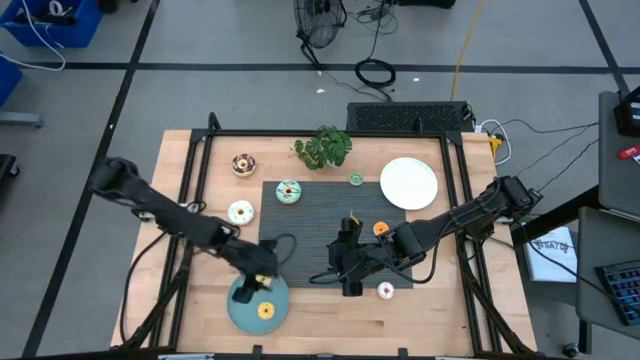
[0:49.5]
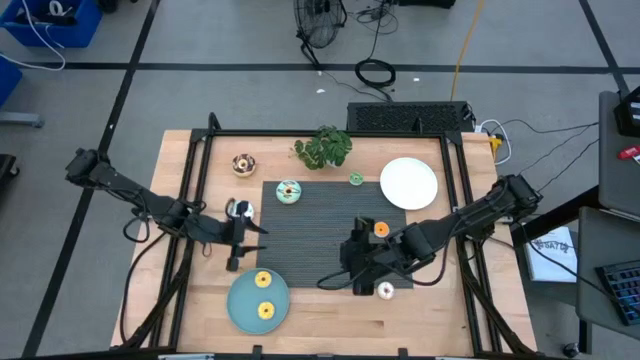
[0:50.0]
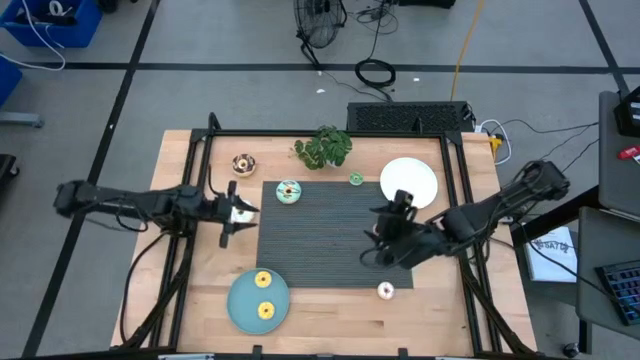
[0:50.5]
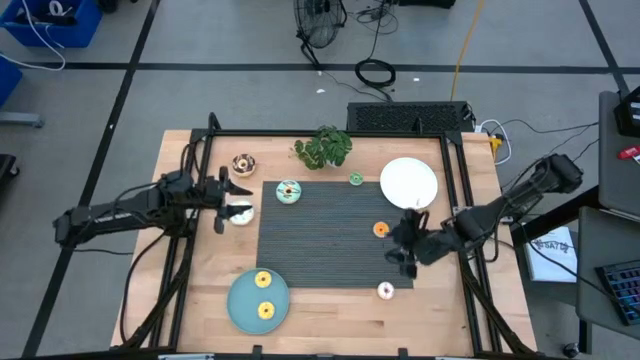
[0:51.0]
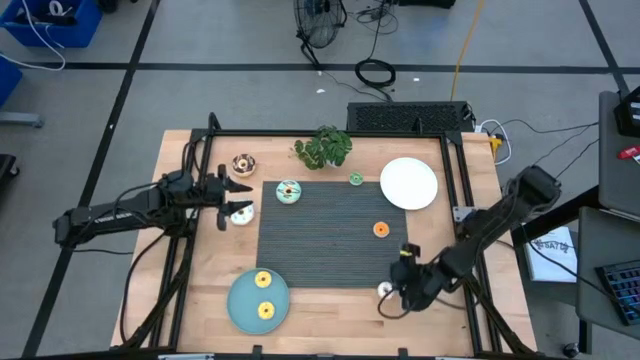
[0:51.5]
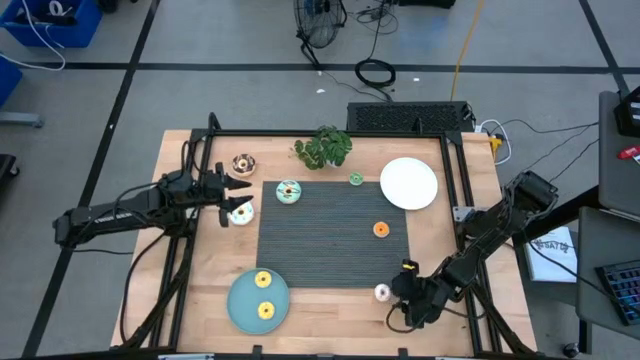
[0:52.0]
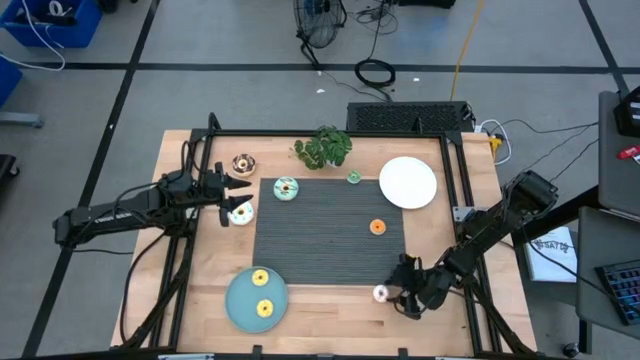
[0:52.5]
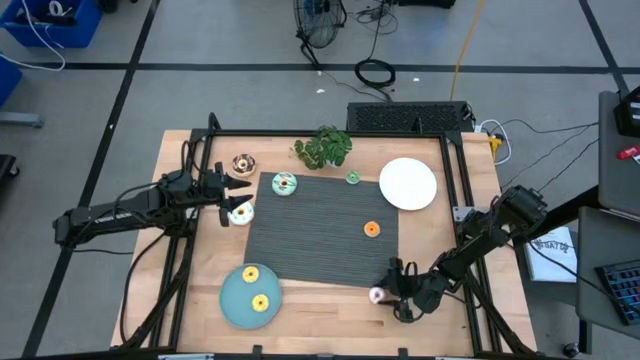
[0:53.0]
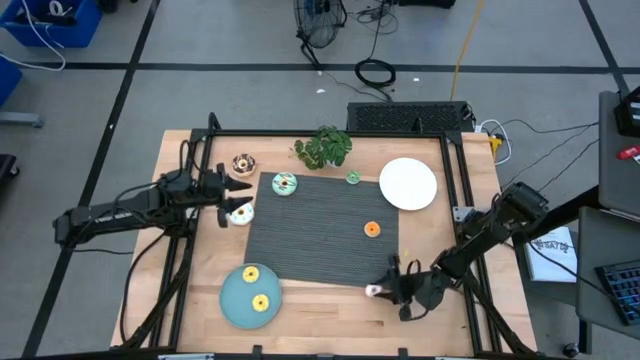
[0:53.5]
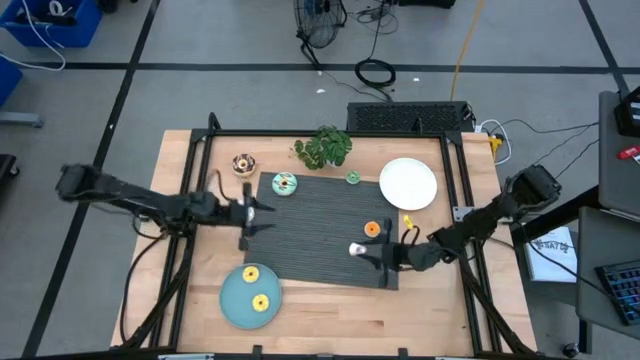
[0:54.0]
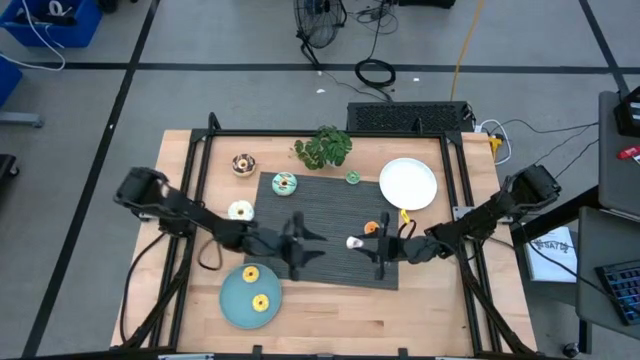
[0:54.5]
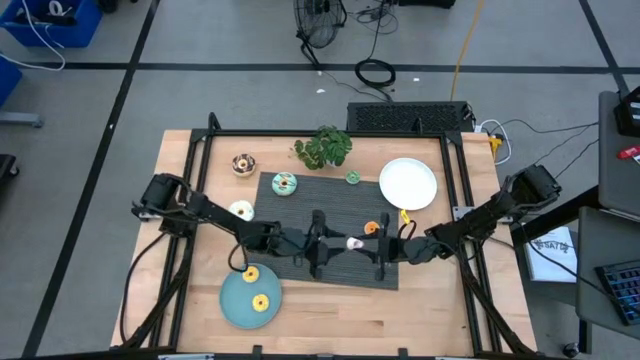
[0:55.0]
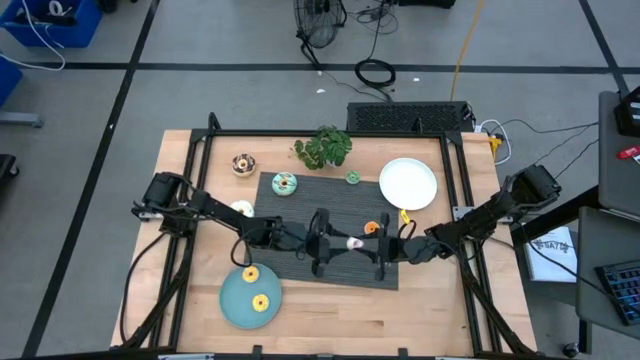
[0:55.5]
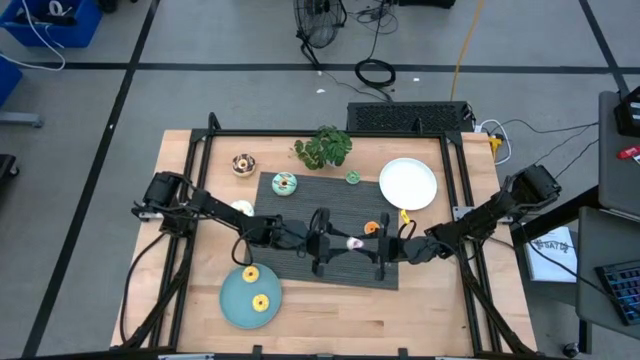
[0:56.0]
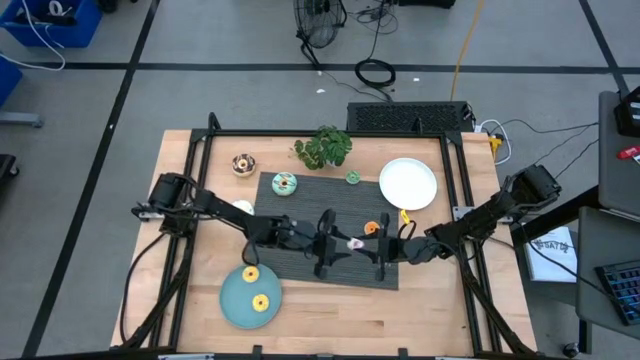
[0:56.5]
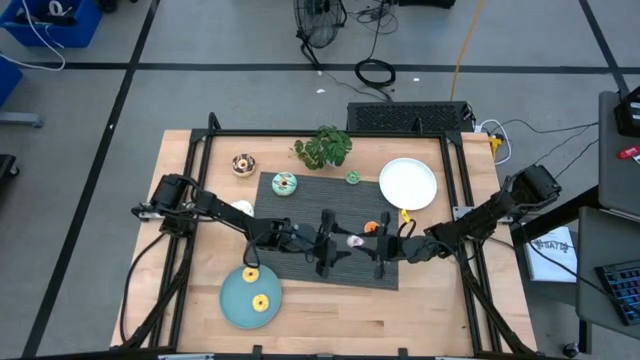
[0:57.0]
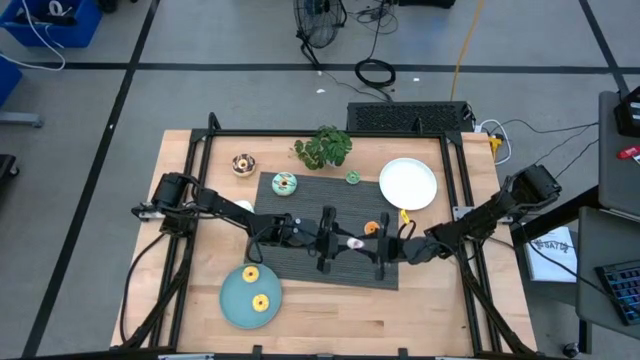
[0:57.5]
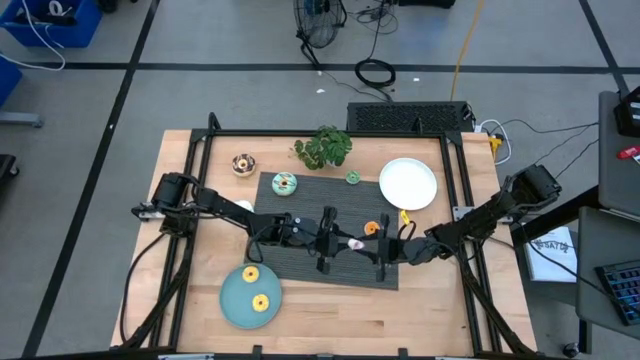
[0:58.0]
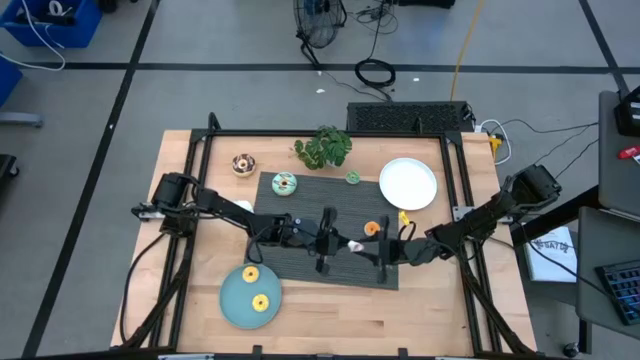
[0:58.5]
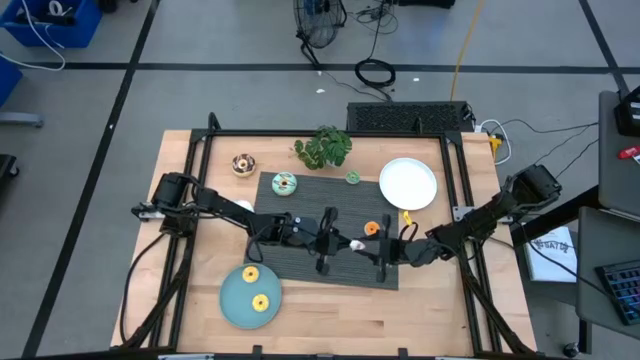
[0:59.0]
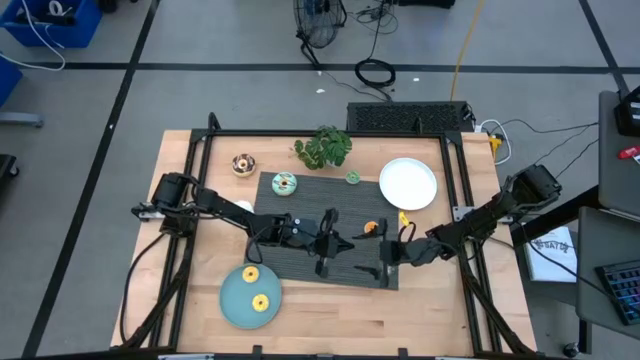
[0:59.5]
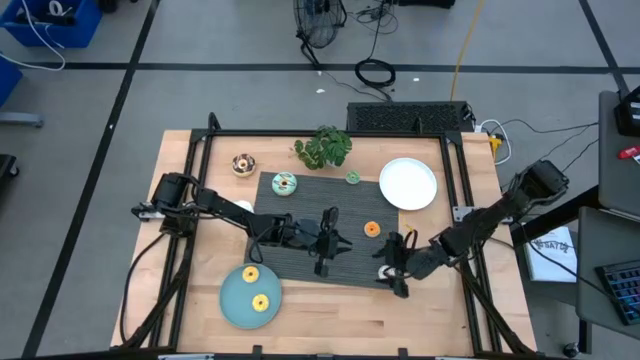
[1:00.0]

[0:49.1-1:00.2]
Task: Pick & Place donuts
Put the small white donut on the blue plate

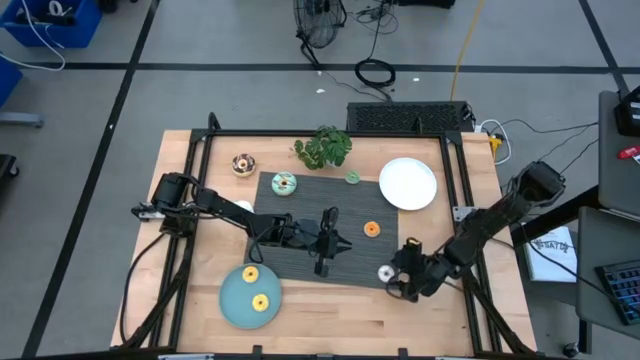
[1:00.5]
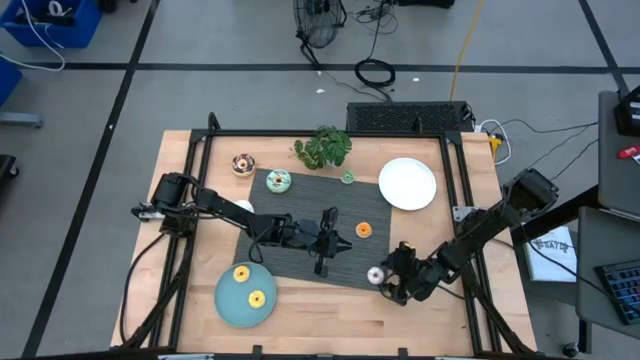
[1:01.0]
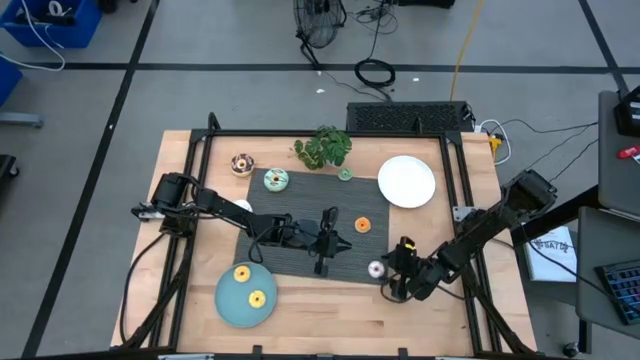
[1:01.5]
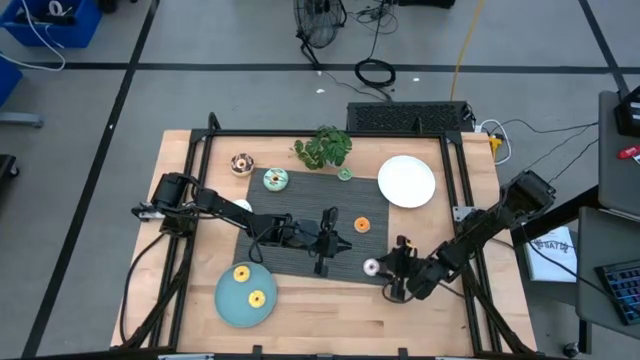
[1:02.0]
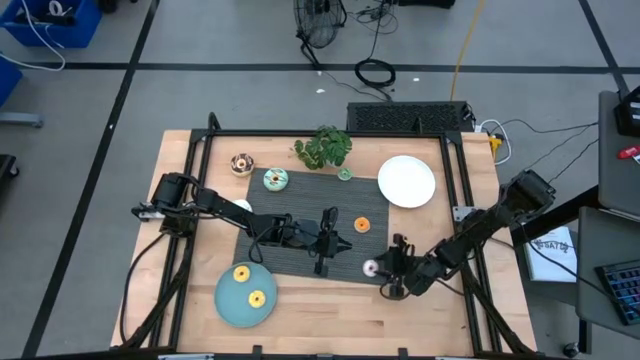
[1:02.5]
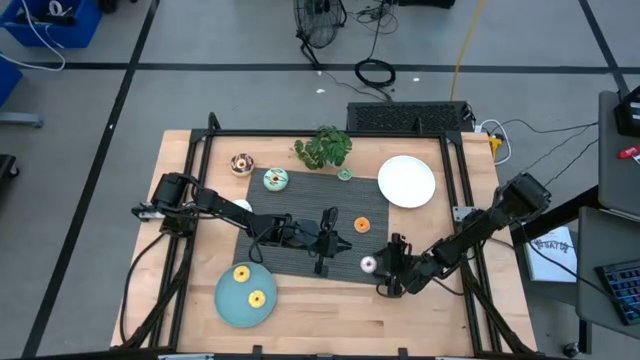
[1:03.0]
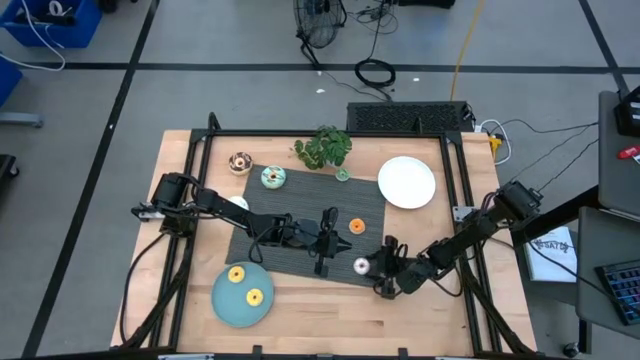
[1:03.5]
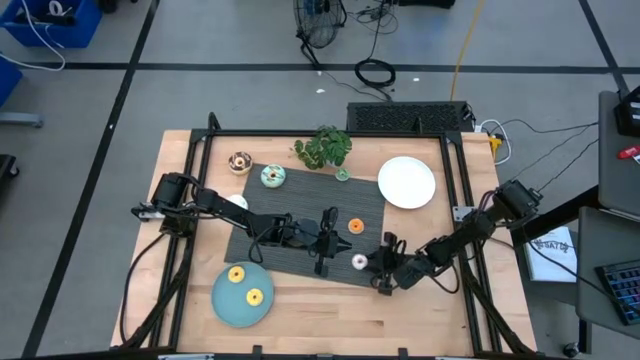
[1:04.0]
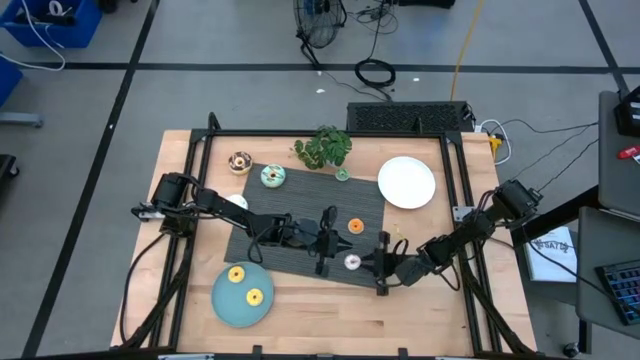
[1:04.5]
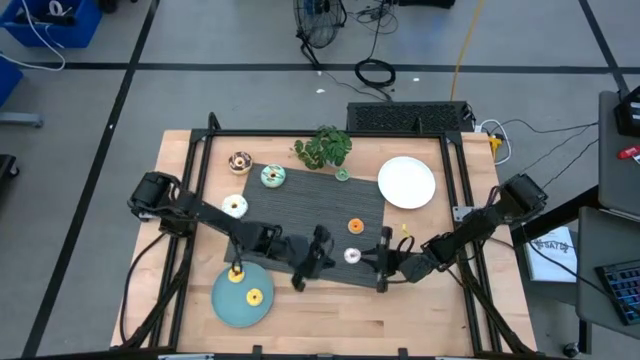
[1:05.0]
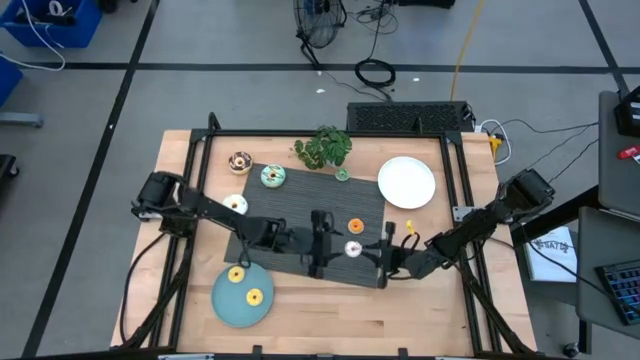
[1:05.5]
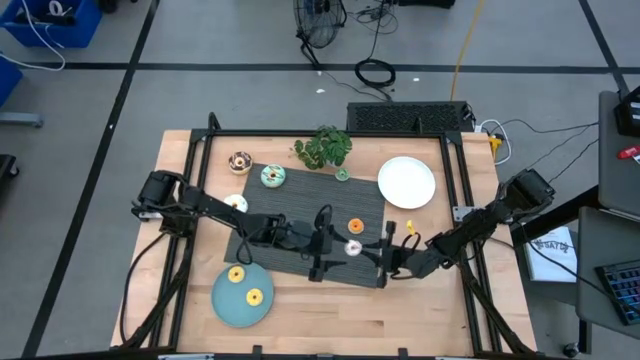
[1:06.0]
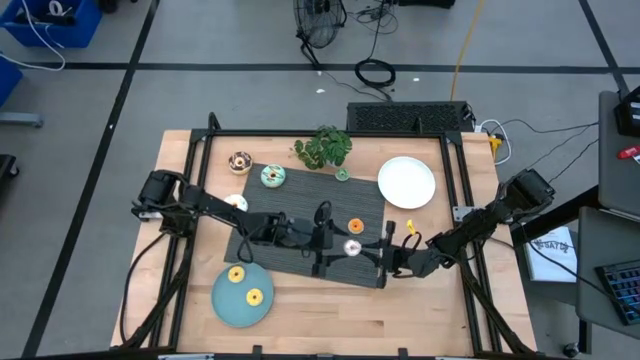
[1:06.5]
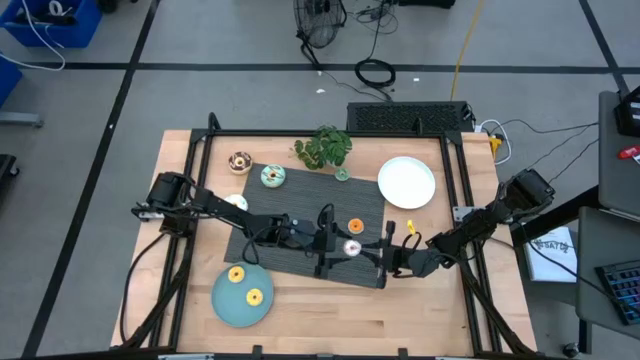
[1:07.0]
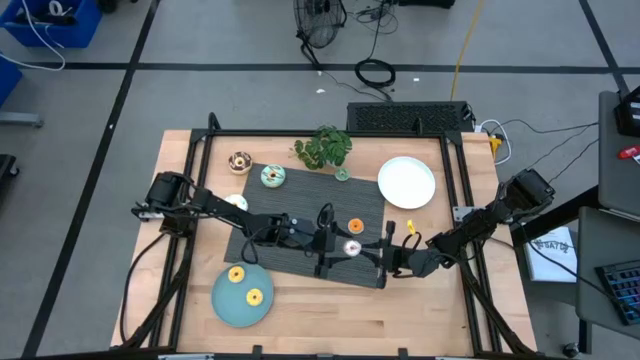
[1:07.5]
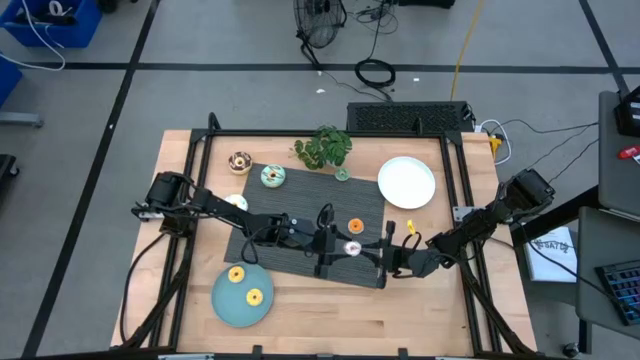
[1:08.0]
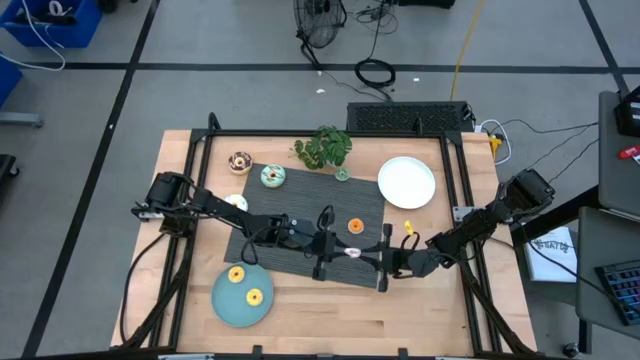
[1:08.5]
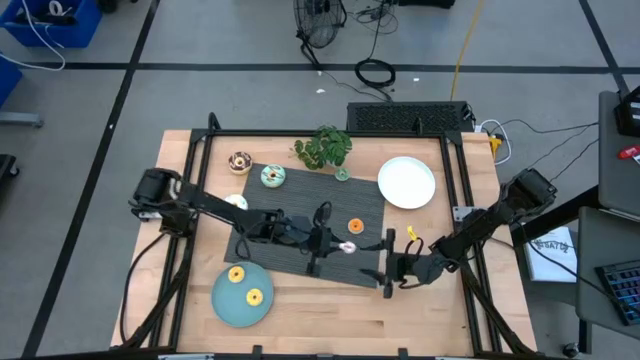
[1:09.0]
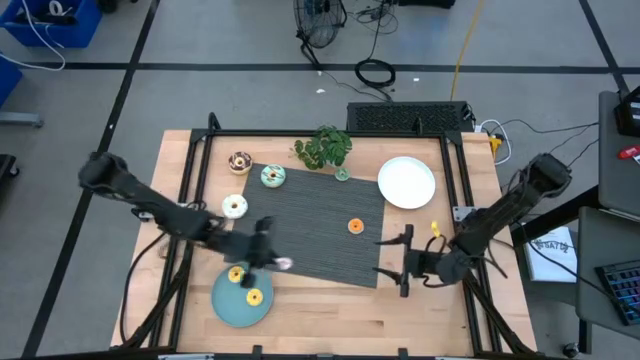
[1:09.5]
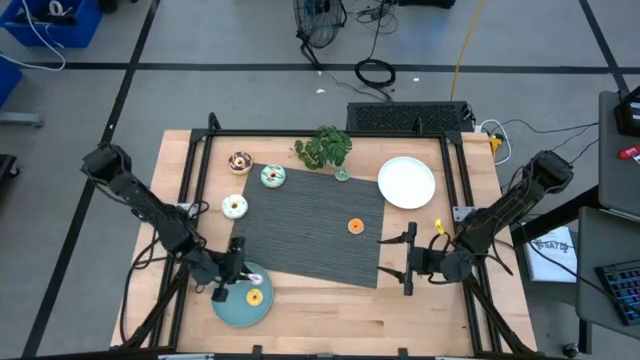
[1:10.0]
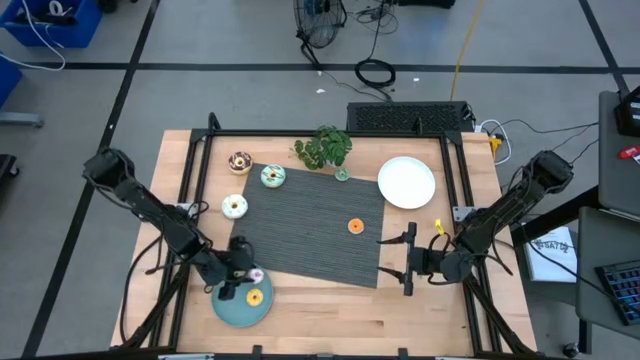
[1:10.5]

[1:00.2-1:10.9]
Put the small white donut on the blue plate
